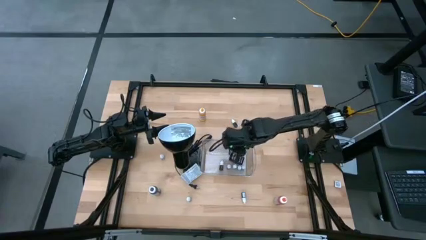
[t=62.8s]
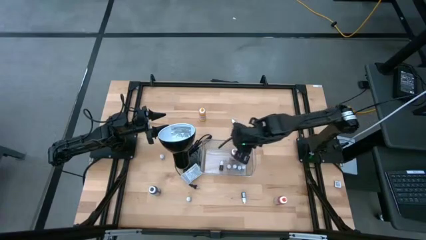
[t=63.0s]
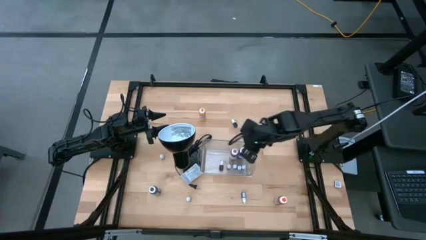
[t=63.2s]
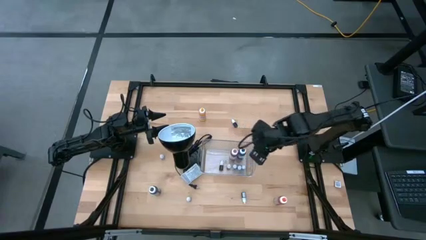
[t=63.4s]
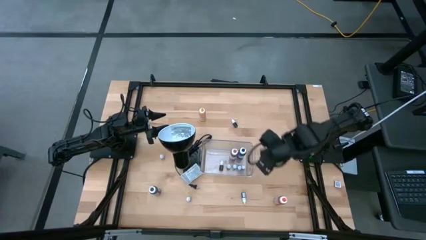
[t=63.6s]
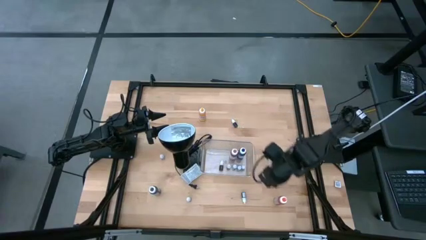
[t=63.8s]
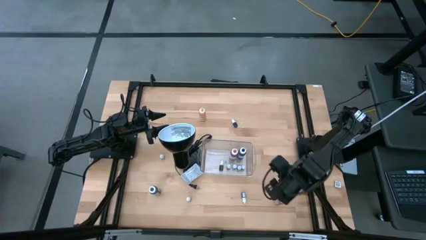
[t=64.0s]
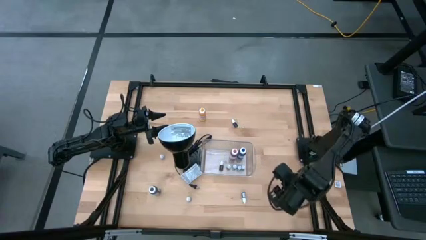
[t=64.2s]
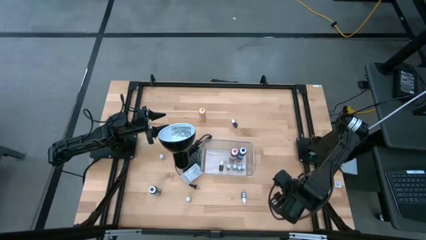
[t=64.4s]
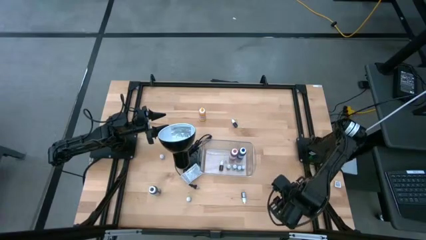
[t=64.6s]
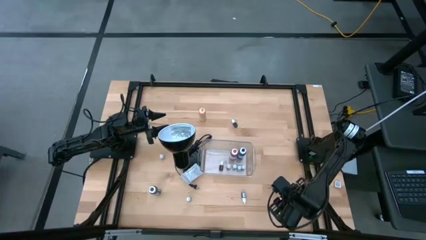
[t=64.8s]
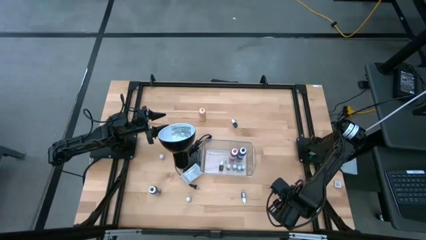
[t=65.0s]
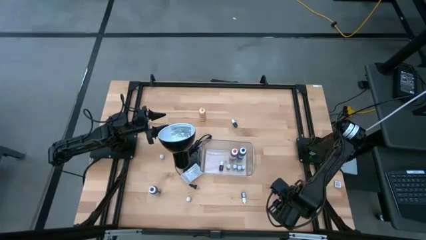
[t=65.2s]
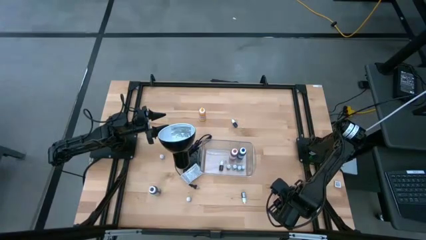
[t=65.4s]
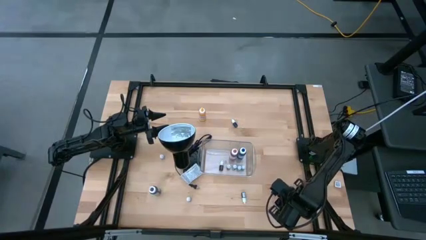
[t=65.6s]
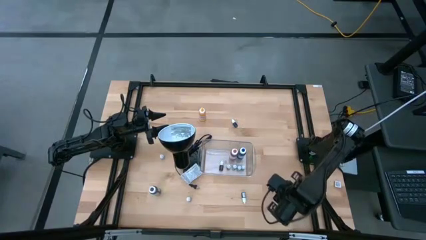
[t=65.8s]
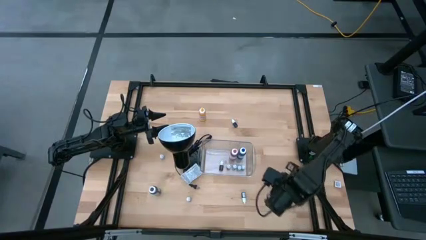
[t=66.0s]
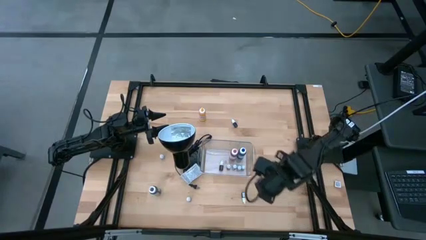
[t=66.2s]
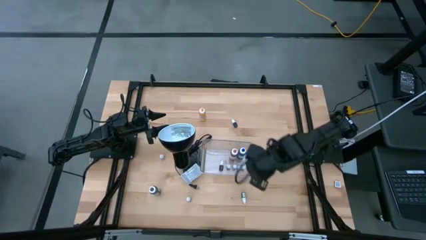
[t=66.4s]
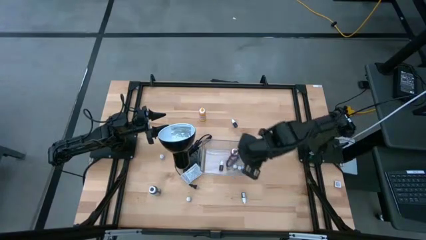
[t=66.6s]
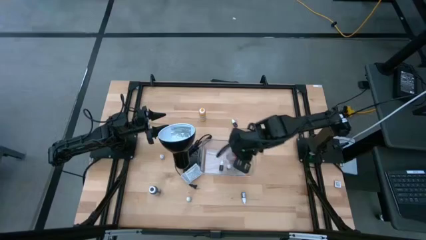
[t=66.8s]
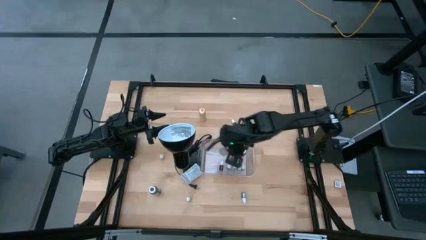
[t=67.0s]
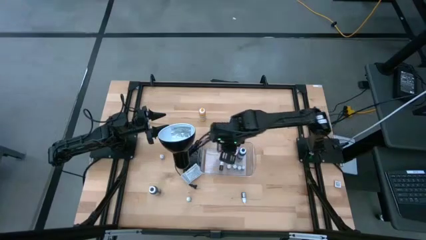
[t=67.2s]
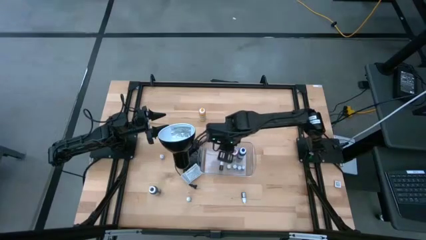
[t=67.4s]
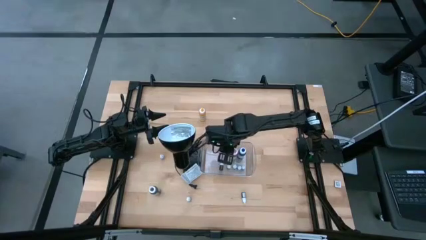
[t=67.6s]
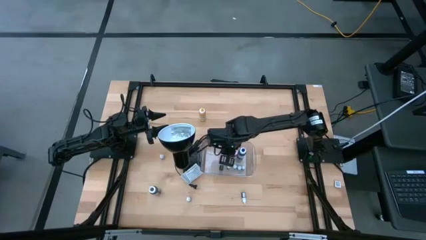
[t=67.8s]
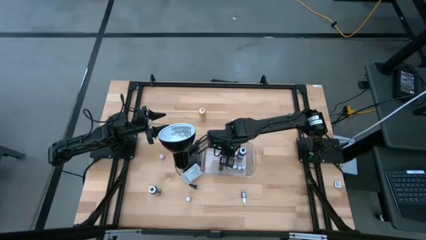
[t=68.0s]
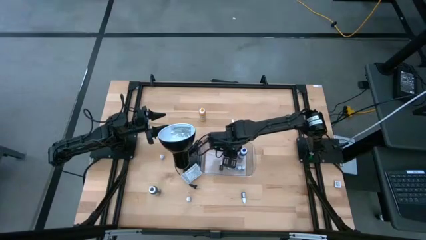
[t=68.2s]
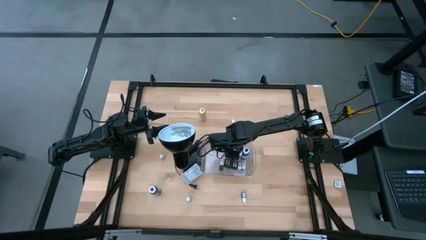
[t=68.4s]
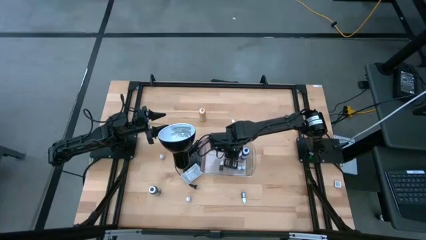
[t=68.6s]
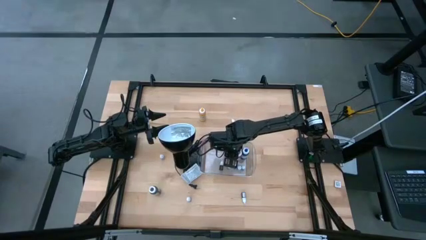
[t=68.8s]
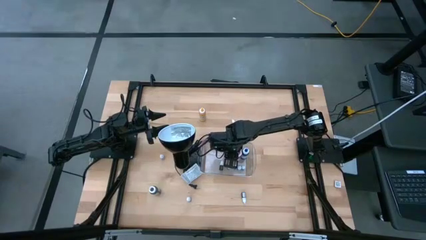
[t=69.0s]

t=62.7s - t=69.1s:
Task: Pick & Place food coloring
Put the big orange food coloring bottle into the transparent bin

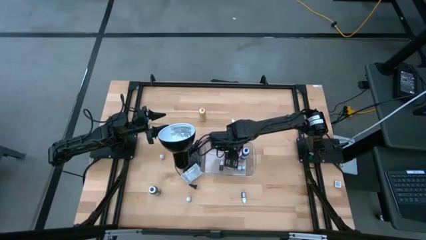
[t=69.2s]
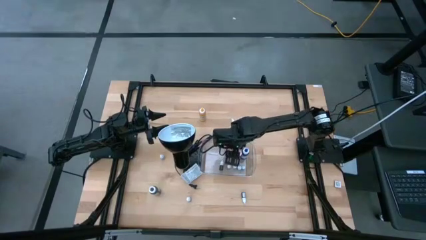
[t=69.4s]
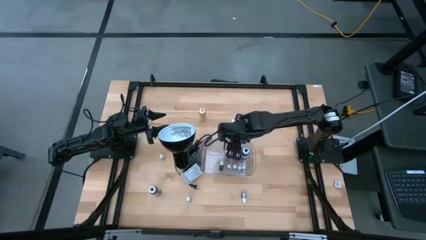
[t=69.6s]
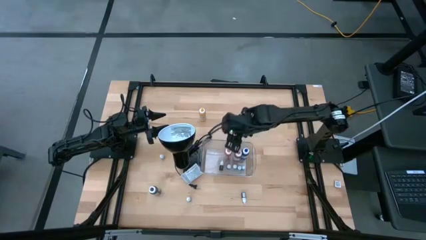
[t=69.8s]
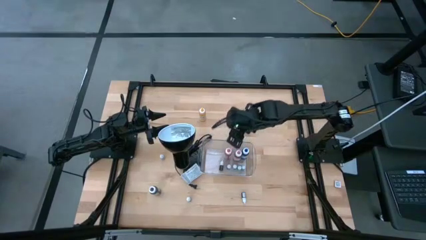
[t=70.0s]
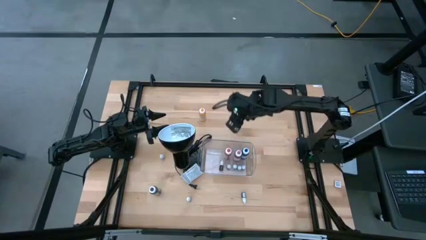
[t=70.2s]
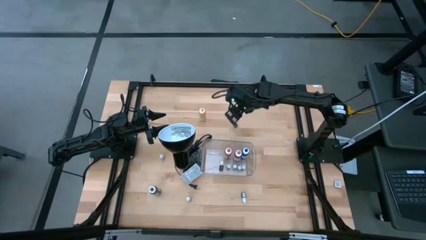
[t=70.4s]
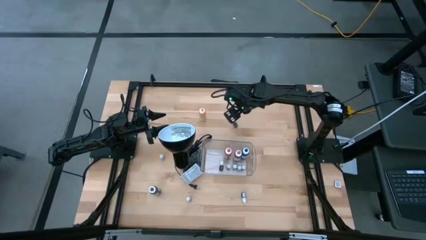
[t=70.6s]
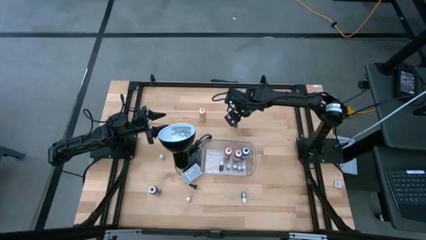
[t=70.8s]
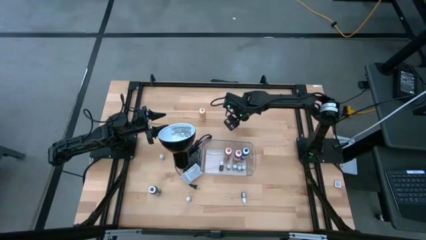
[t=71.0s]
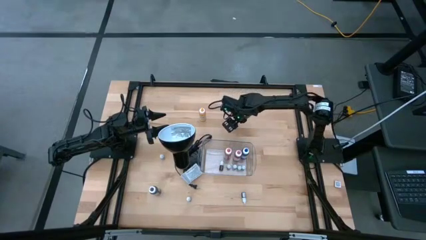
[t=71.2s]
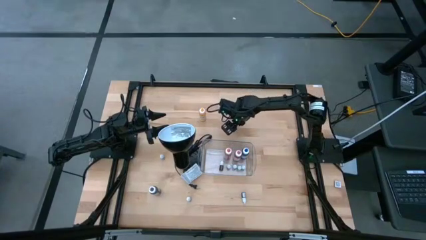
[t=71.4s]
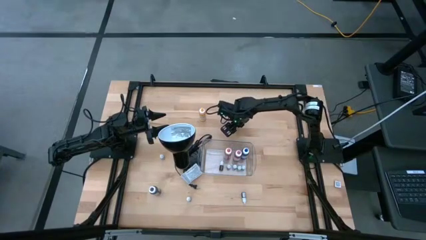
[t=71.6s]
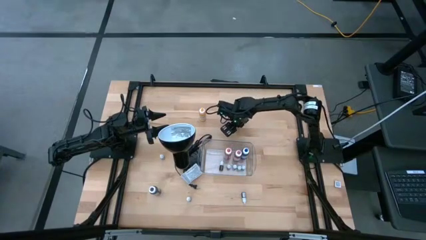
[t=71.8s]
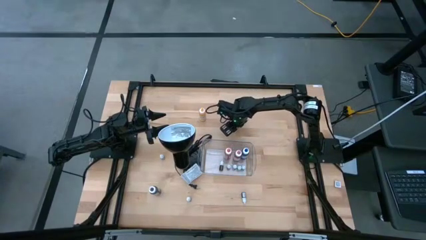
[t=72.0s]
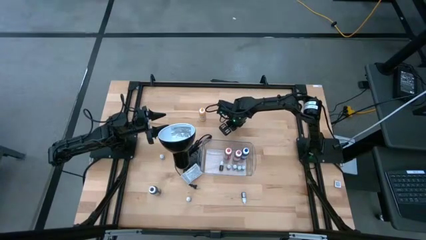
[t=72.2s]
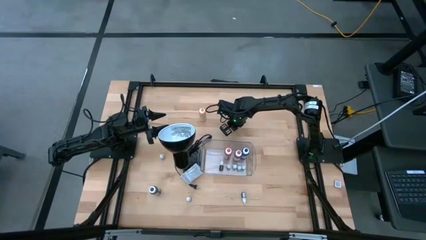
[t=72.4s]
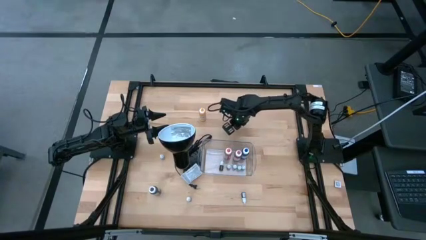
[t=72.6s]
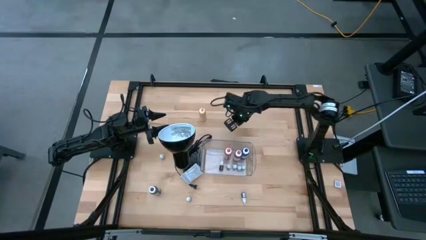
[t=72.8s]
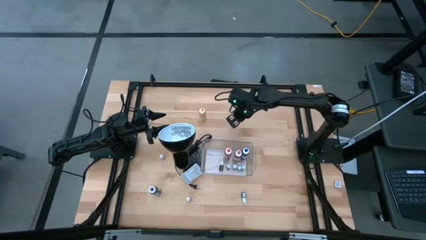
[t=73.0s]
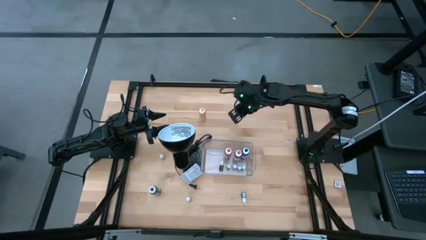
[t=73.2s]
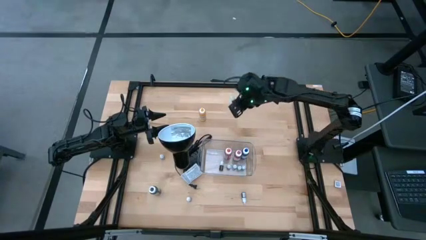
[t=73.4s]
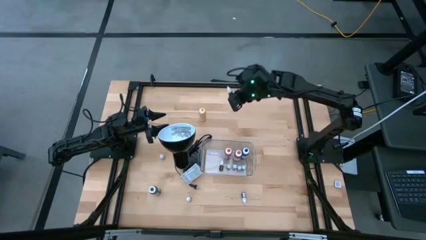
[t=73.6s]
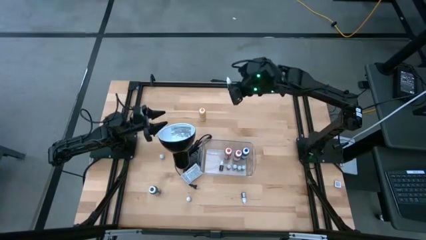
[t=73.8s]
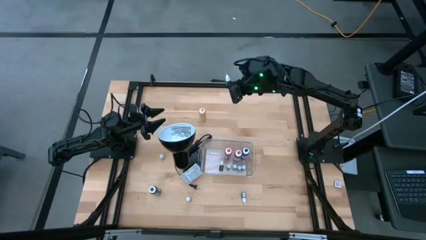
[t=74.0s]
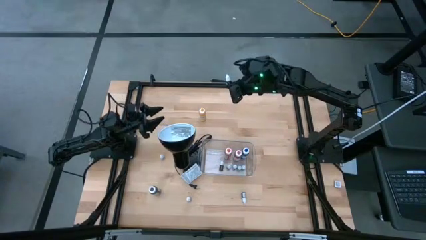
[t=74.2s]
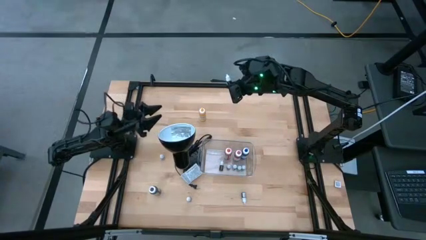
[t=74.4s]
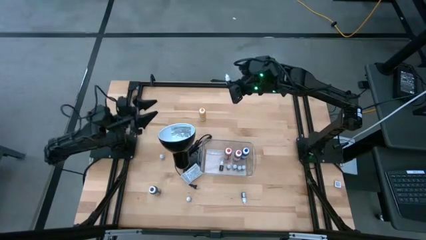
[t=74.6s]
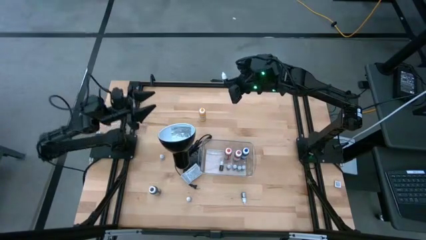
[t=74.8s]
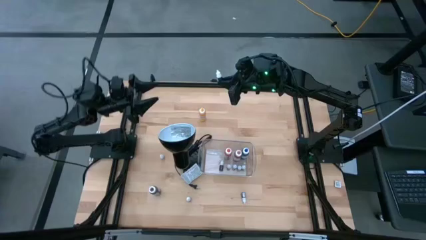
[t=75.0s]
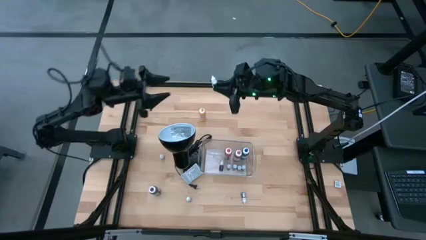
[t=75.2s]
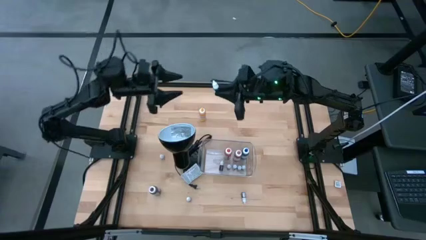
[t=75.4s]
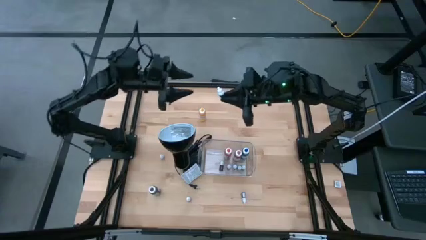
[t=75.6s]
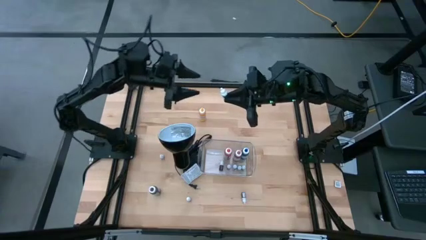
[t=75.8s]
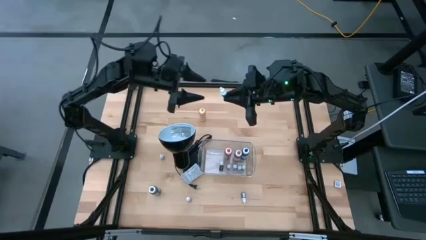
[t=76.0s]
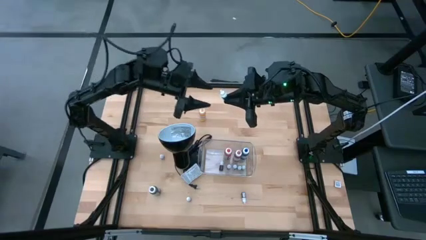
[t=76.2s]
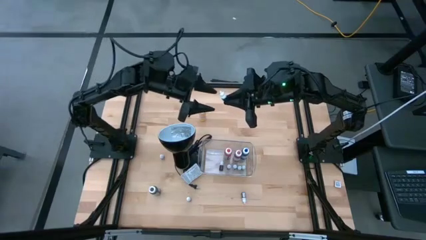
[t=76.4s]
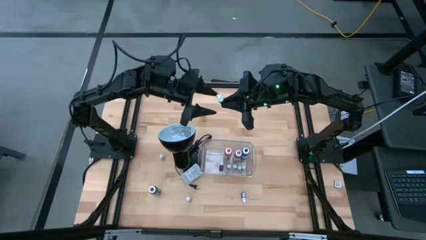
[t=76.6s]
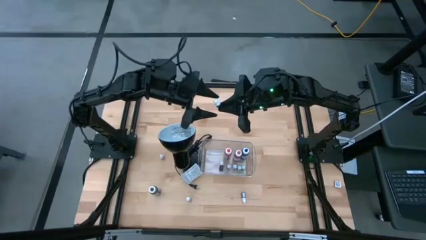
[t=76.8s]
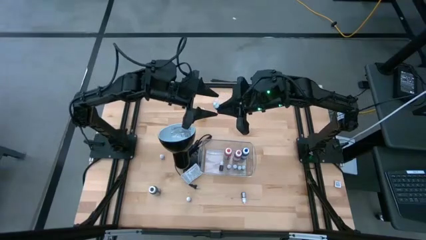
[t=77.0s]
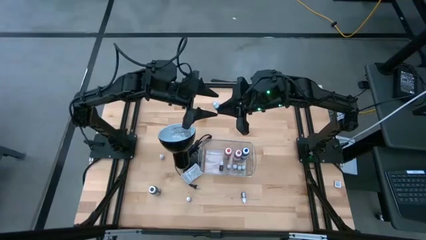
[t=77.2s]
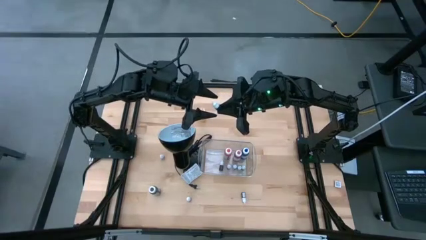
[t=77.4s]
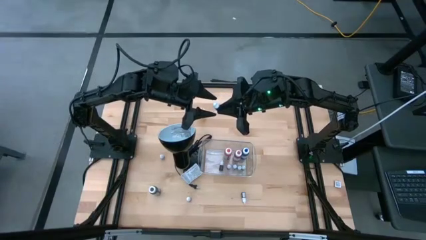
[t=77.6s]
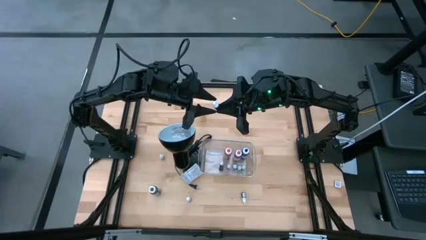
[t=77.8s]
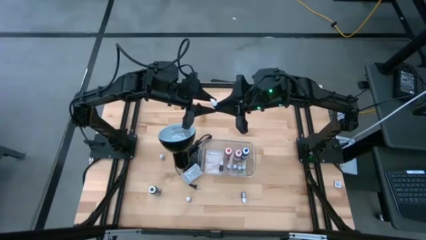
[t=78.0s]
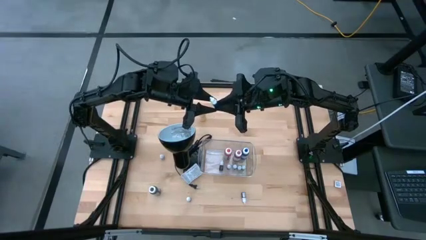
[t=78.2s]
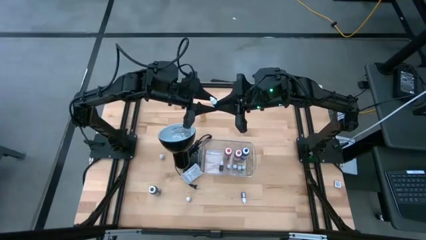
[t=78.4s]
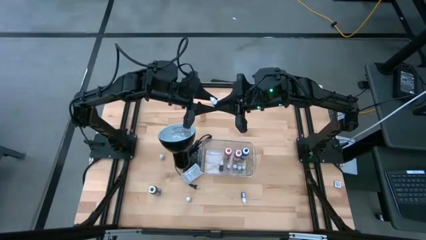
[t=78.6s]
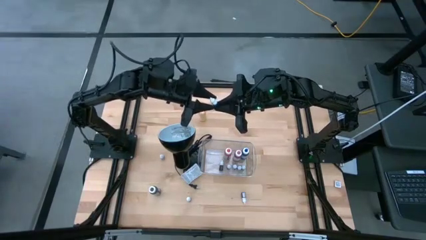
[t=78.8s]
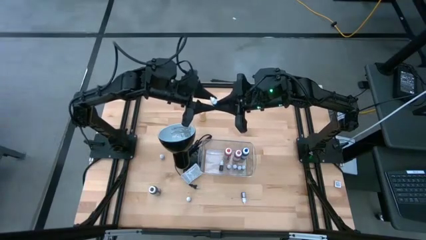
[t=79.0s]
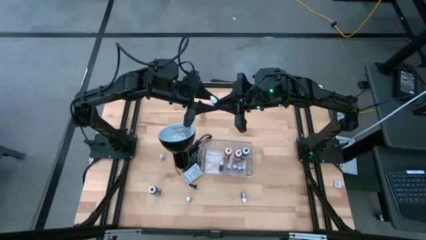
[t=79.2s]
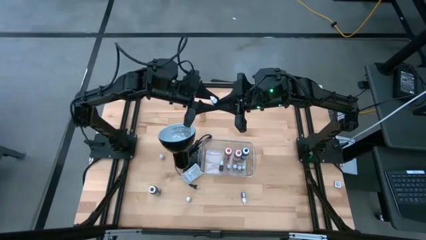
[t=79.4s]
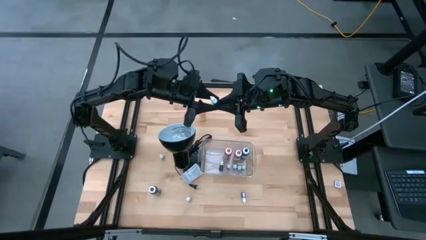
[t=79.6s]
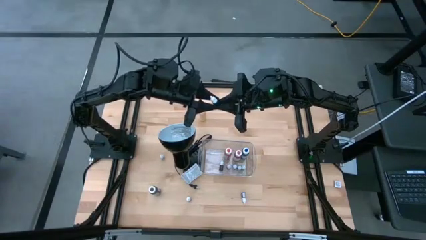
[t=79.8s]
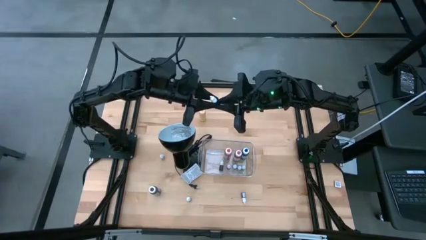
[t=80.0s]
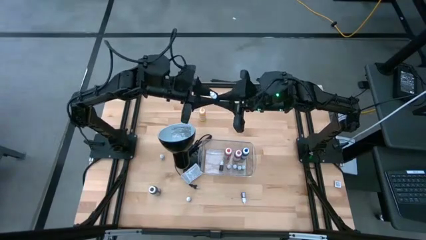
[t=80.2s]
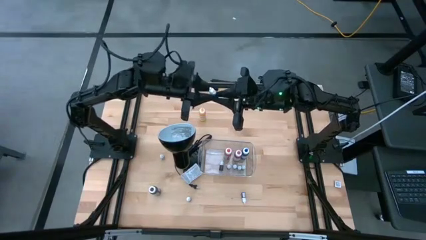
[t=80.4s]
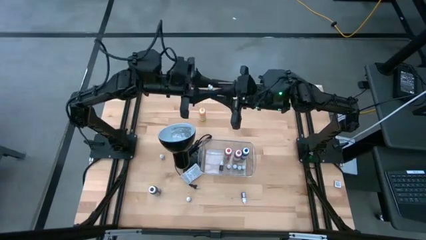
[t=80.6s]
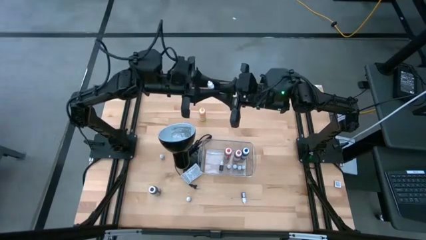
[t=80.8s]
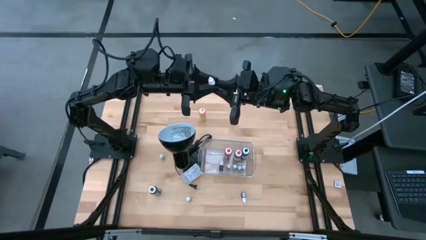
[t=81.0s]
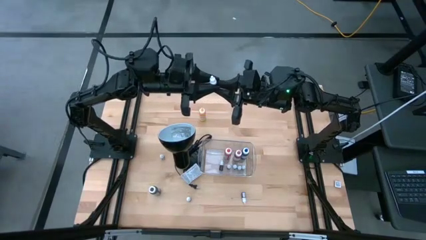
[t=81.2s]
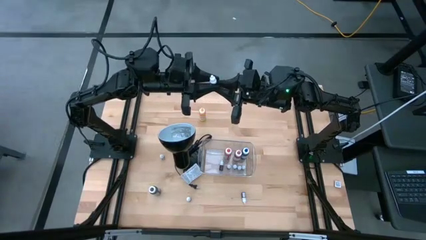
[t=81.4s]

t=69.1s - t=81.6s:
Put the small black food coloring bottle into the transparent bin
